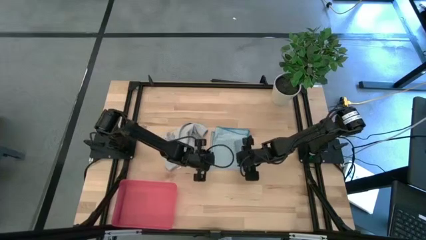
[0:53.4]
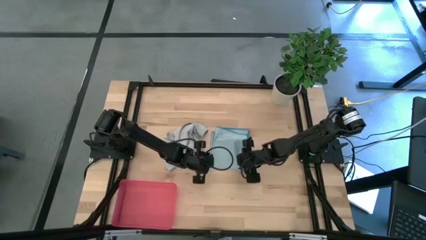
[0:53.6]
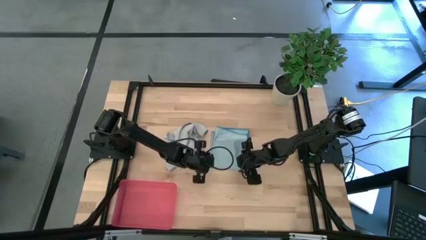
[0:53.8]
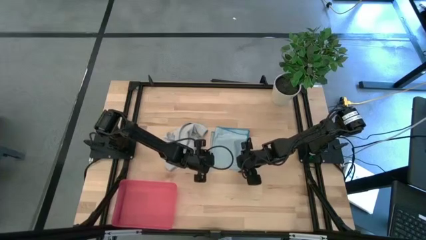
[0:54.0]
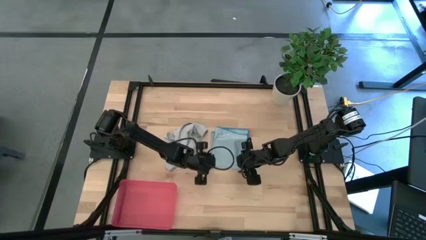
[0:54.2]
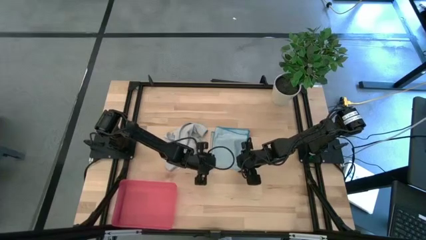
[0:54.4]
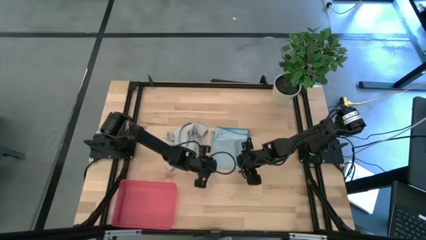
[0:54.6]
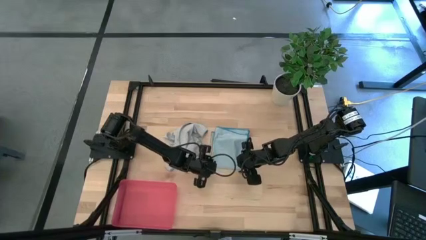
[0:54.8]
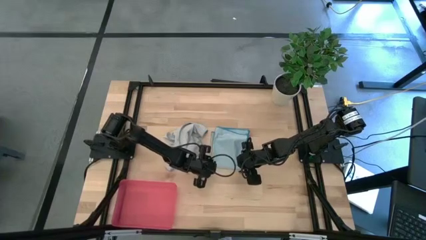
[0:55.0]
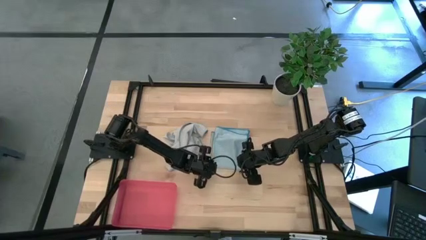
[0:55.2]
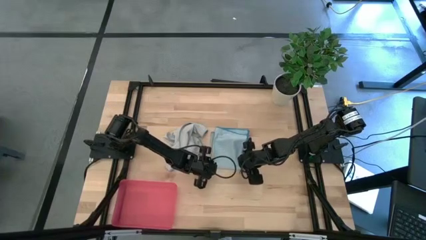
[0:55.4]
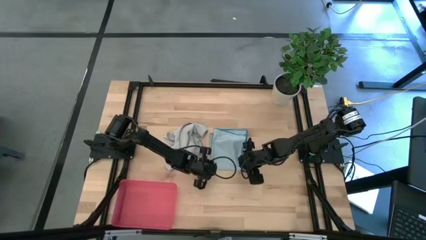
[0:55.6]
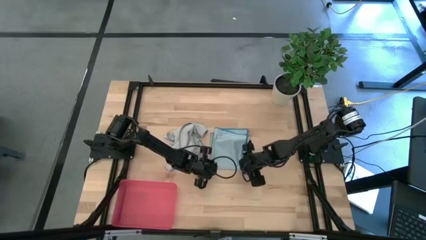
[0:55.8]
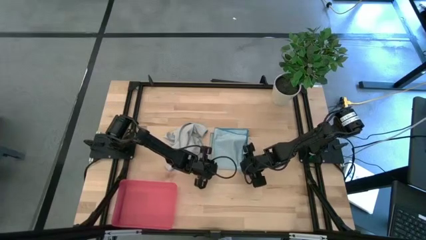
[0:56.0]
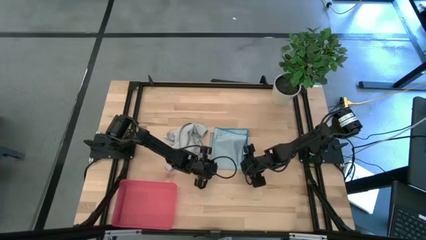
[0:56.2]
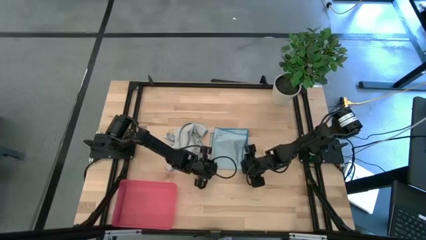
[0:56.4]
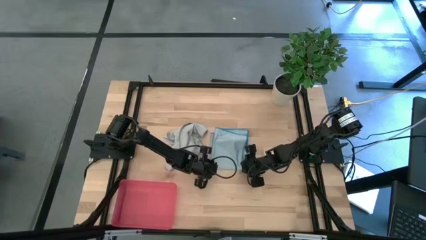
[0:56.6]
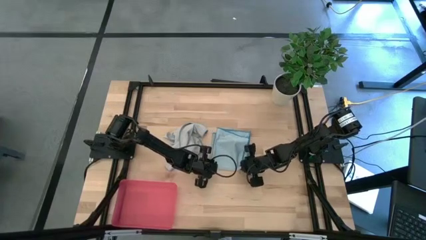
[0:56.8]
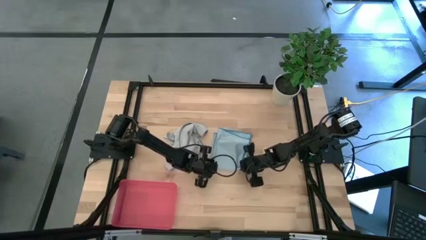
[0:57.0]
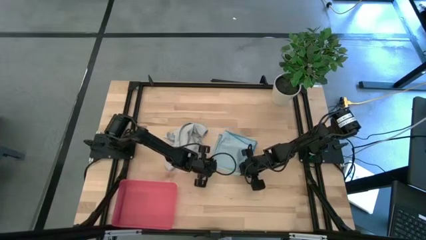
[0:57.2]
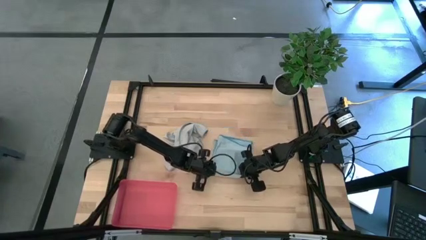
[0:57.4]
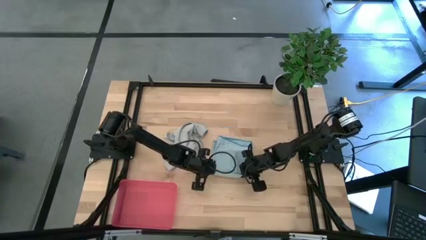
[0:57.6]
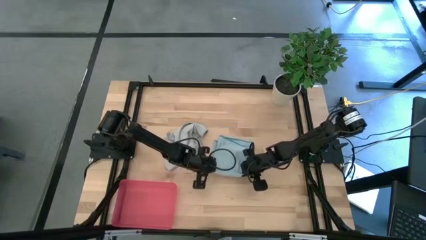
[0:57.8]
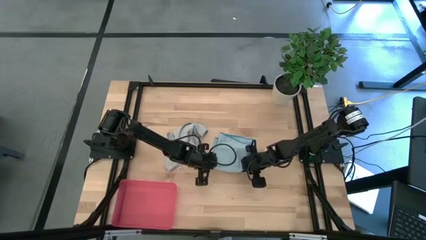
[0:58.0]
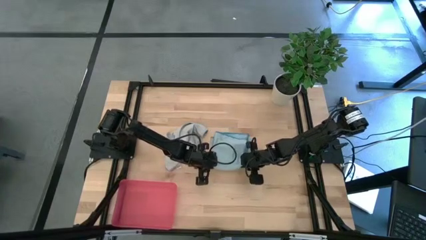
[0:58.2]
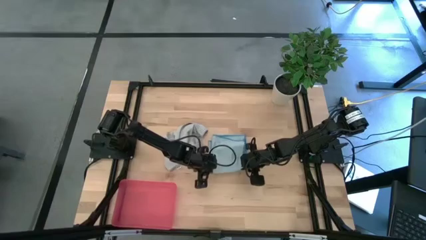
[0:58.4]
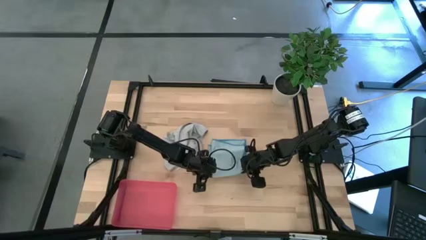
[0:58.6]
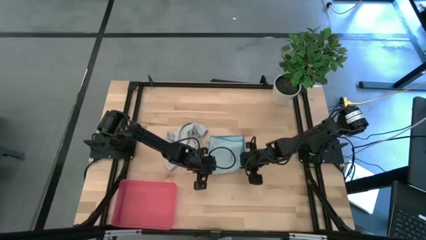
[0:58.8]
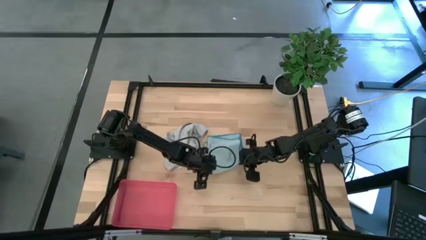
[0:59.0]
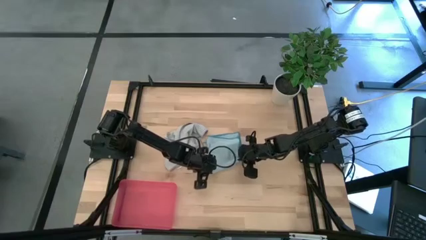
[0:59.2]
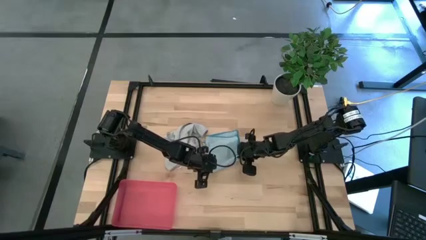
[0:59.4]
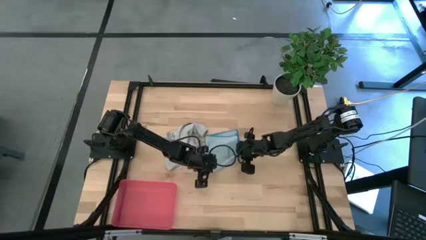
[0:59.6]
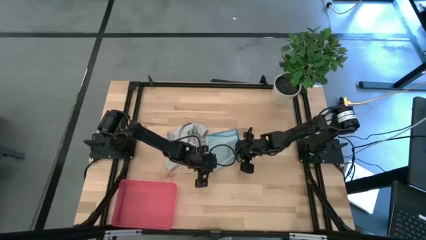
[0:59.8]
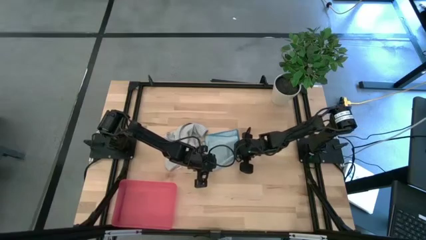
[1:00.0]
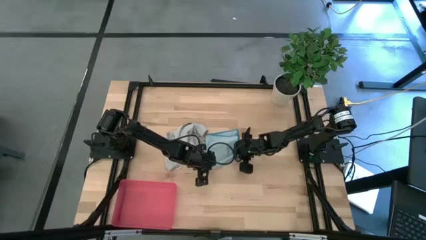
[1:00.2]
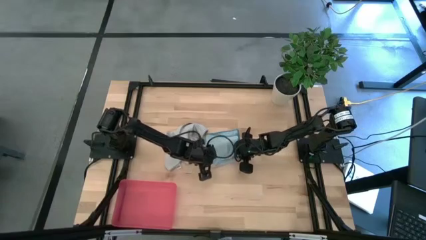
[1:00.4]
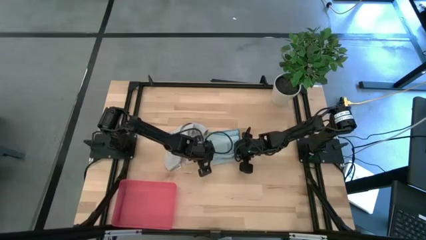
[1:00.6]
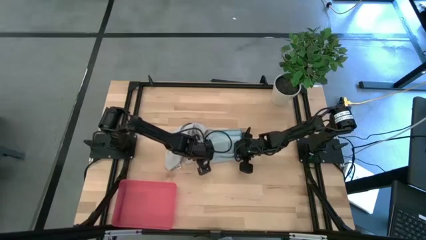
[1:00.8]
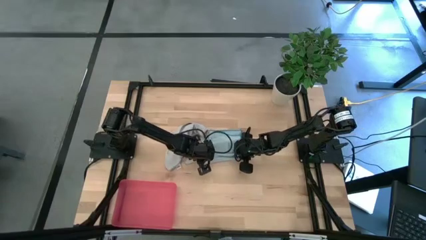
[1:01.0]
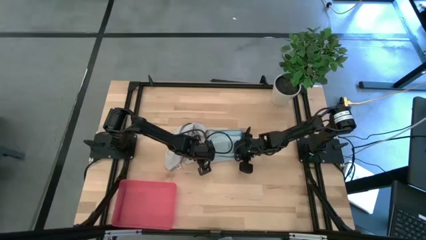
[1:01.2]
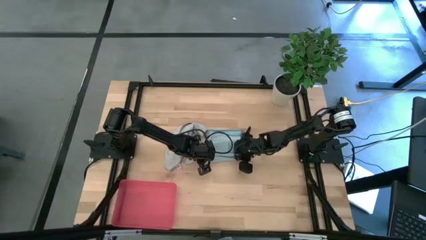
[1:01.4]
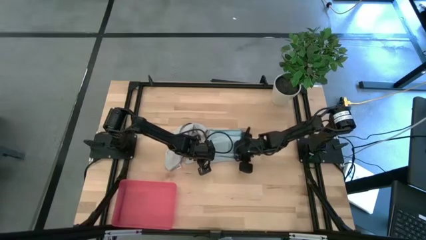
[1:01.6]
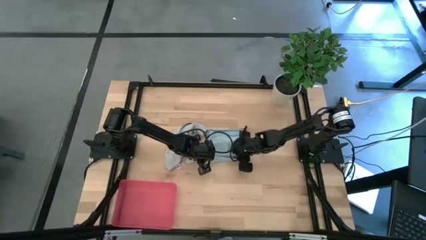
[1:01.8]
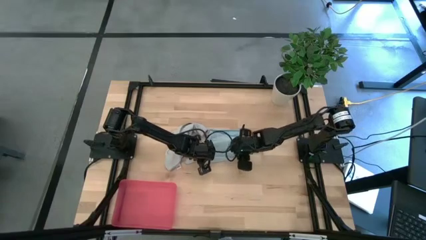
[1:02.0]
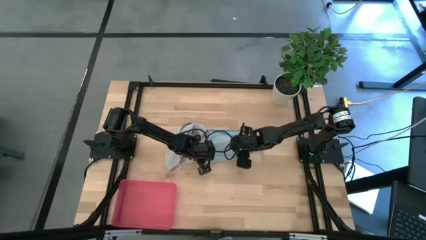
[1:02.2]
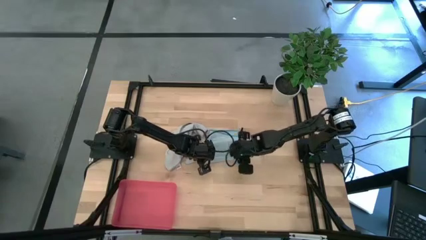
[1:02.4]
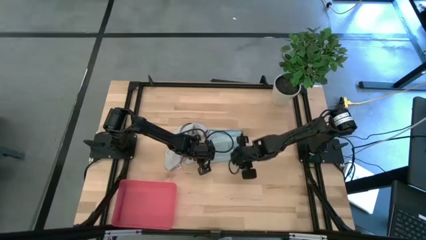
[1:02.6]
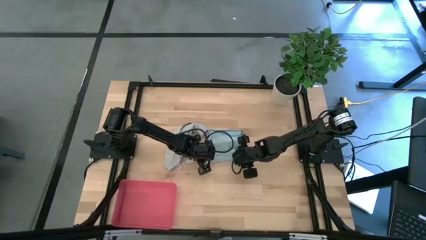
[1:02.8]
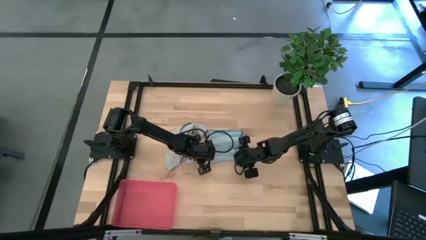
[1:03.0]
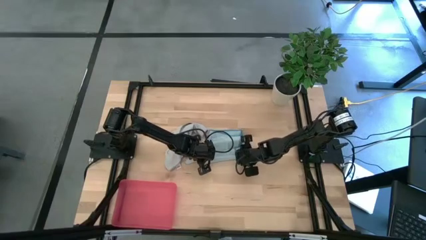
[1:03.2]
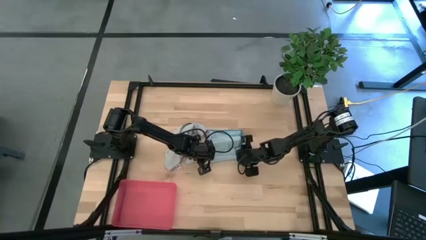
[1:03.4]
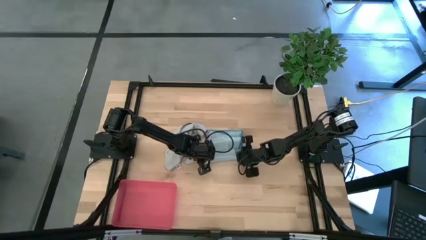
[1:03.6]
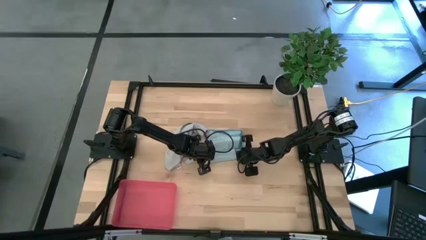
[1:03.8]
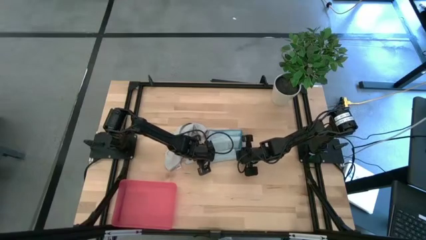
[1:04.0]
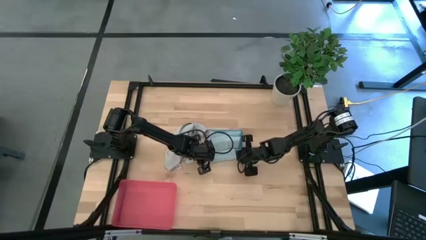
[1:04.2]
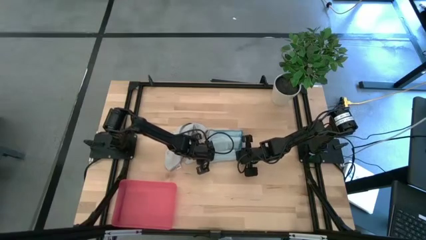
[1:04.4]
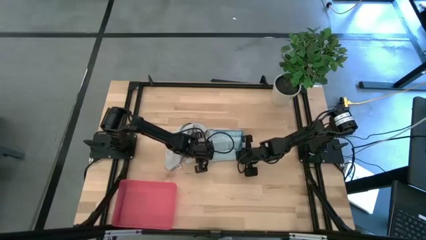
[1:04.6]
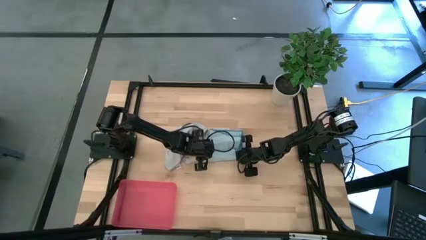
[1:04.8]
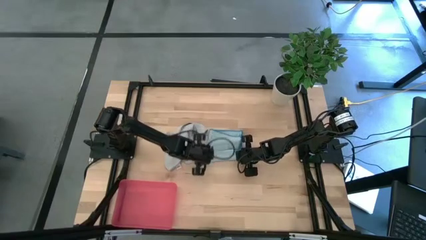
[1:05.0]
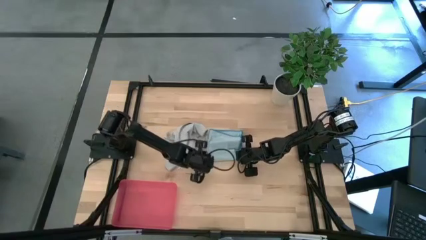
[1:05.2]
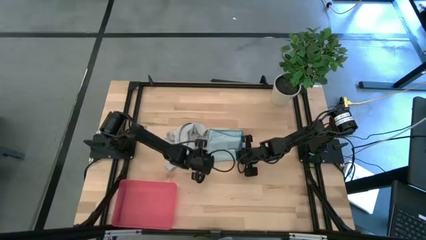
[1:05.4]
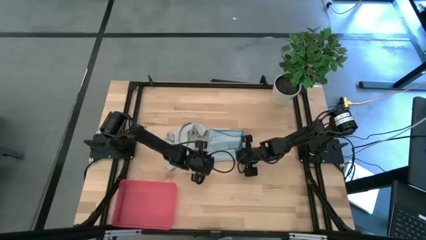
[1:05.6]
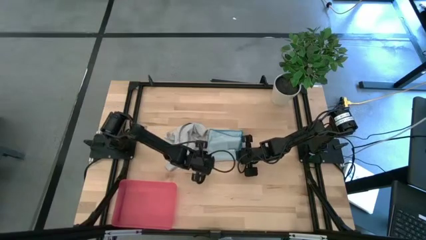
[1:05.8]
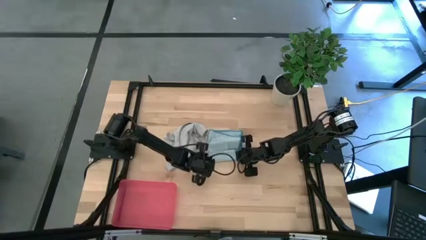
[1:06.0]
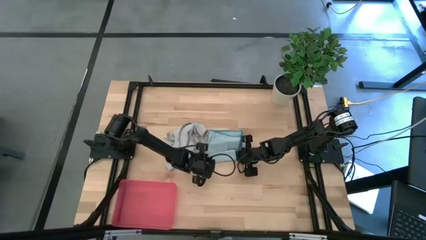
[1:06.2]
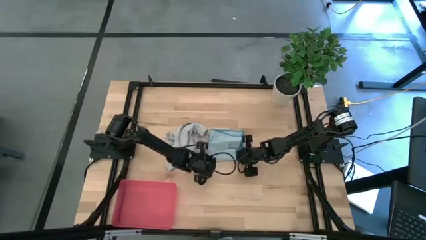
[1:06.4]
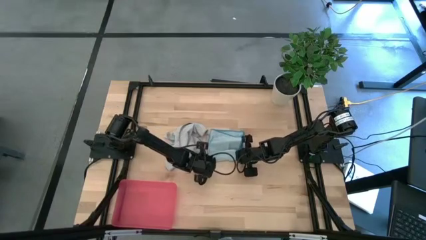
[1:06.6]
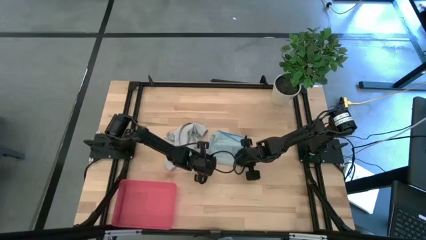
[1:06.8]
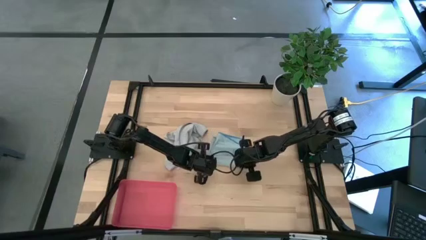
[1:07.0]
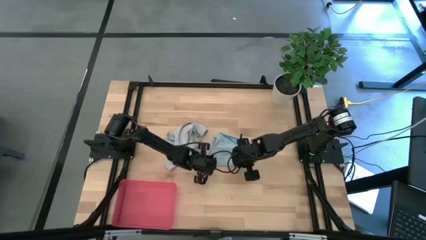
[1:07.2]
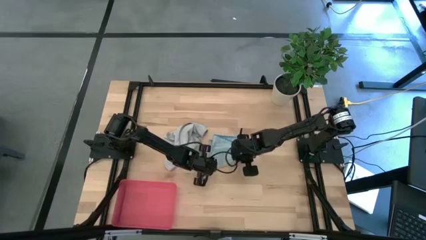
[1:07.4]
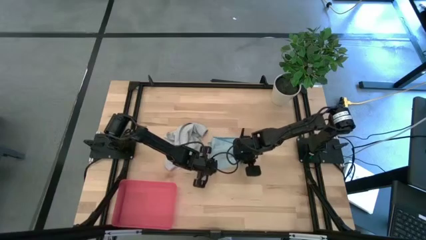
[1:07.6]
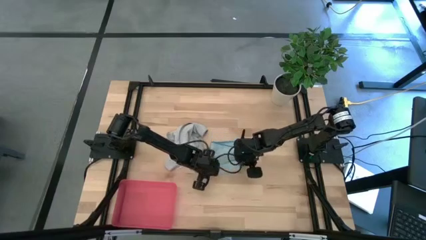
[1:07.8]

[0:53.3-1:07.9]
Task: Roll microfiber towels into tight, uniform cylinder then place into a basket
Roll the blue towel
